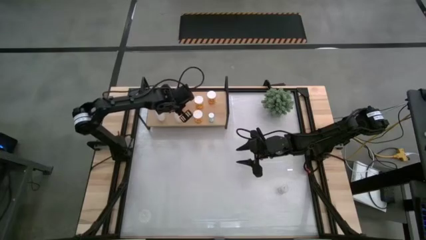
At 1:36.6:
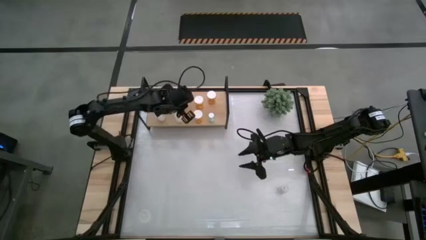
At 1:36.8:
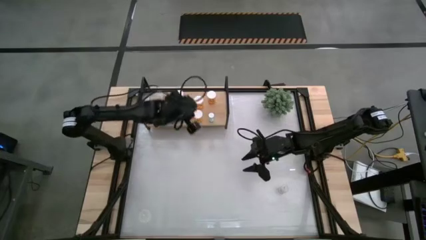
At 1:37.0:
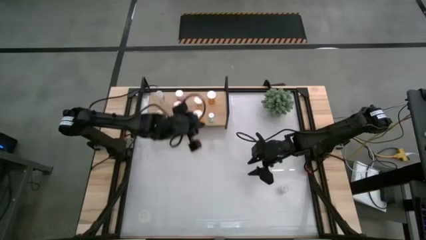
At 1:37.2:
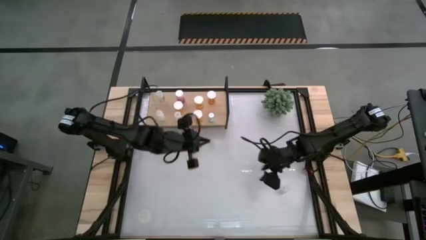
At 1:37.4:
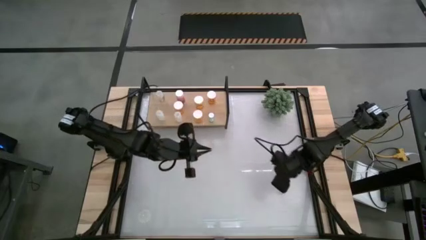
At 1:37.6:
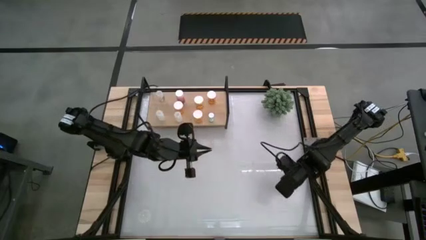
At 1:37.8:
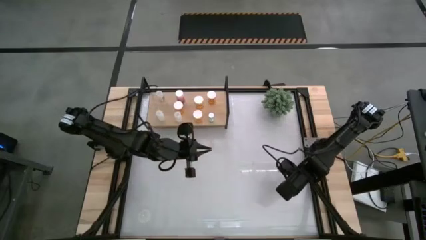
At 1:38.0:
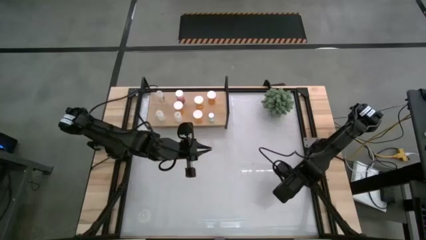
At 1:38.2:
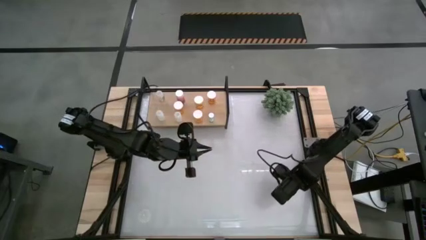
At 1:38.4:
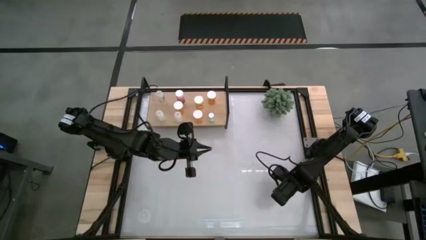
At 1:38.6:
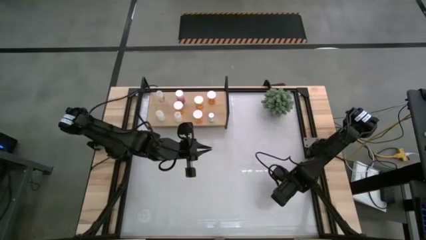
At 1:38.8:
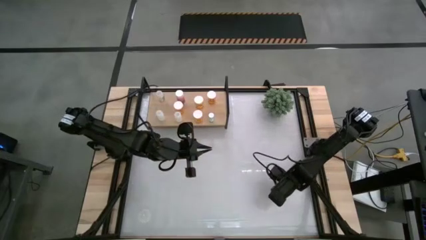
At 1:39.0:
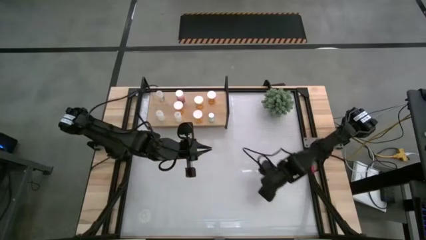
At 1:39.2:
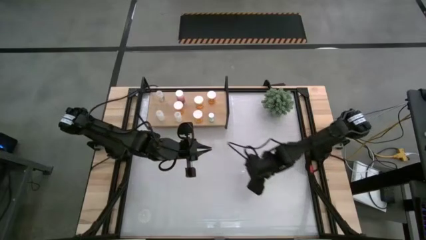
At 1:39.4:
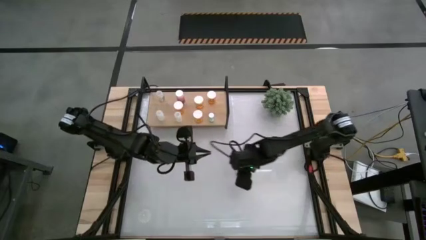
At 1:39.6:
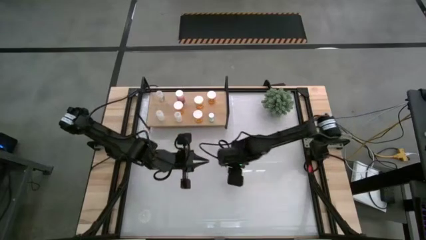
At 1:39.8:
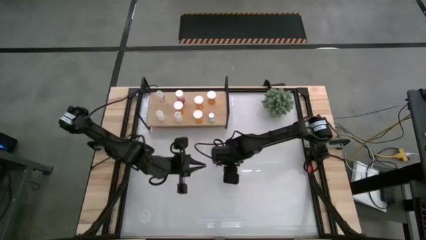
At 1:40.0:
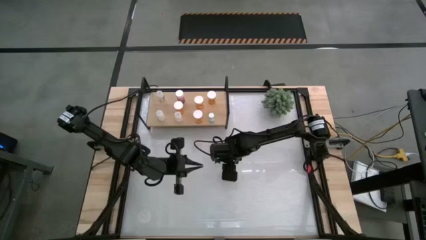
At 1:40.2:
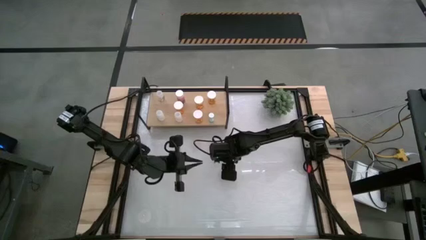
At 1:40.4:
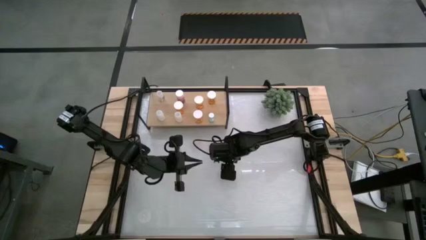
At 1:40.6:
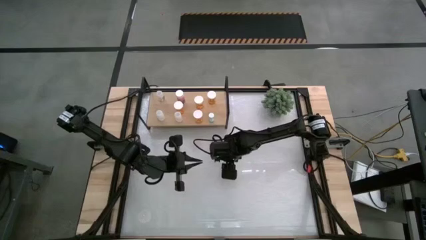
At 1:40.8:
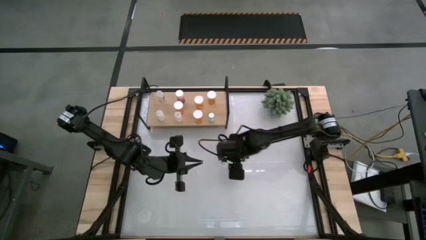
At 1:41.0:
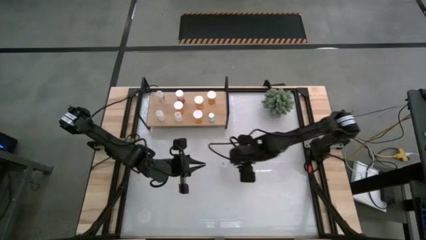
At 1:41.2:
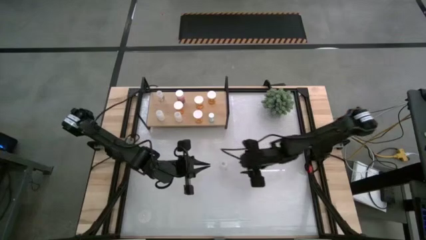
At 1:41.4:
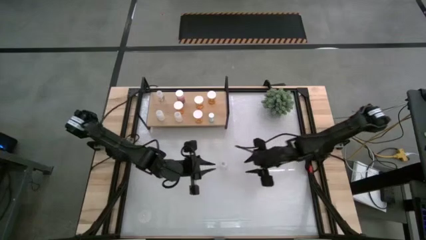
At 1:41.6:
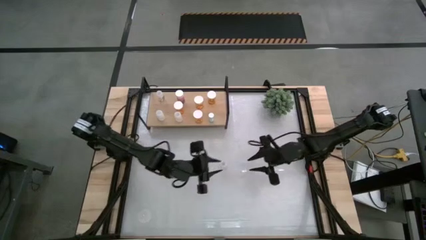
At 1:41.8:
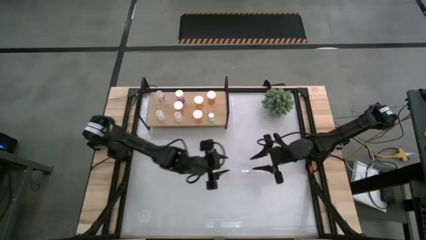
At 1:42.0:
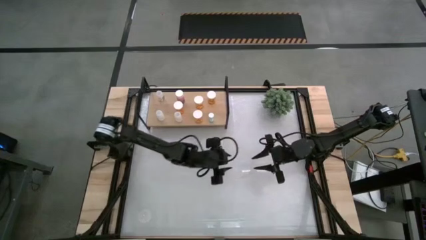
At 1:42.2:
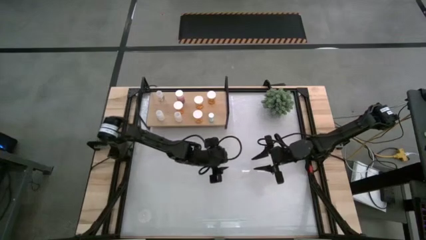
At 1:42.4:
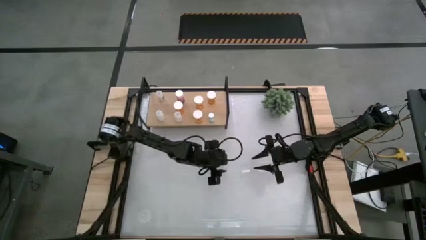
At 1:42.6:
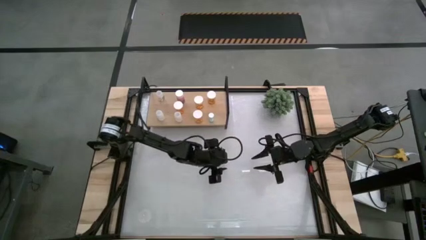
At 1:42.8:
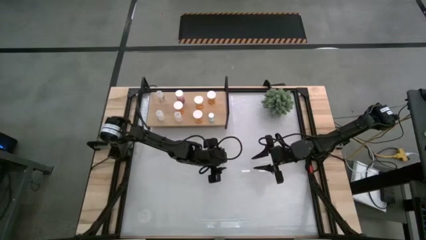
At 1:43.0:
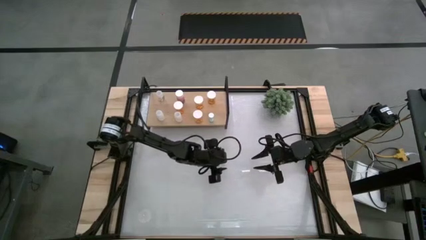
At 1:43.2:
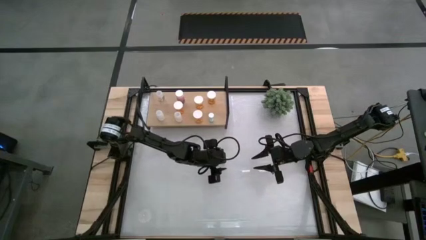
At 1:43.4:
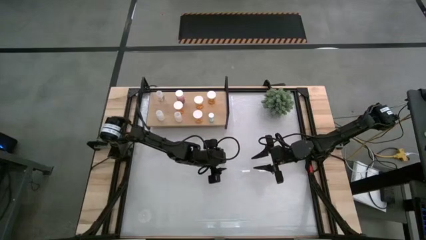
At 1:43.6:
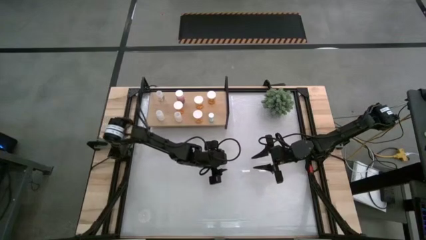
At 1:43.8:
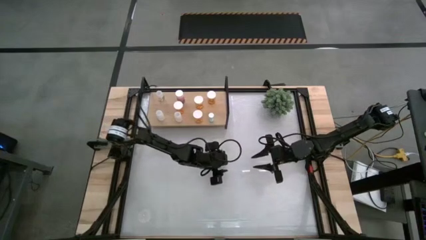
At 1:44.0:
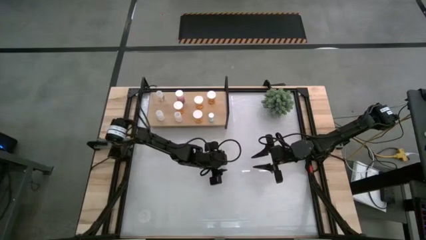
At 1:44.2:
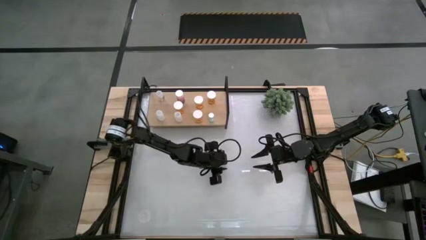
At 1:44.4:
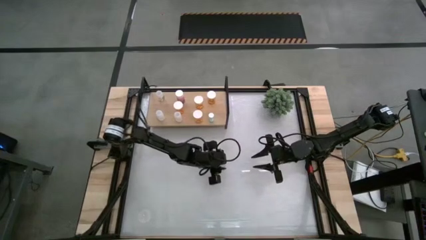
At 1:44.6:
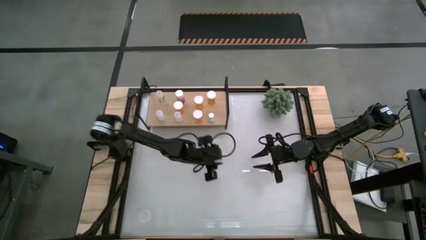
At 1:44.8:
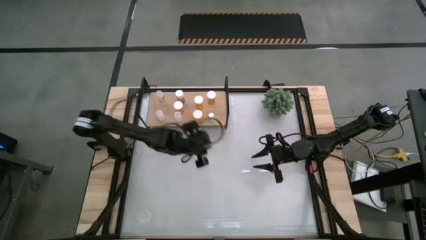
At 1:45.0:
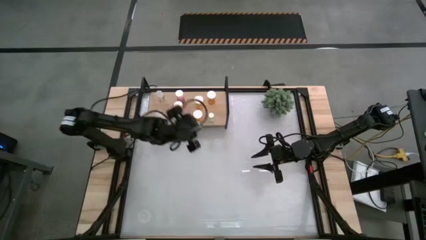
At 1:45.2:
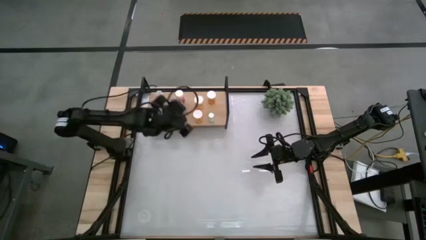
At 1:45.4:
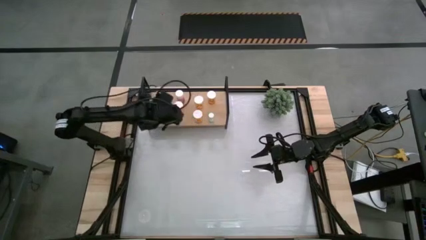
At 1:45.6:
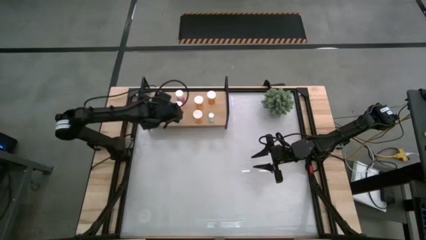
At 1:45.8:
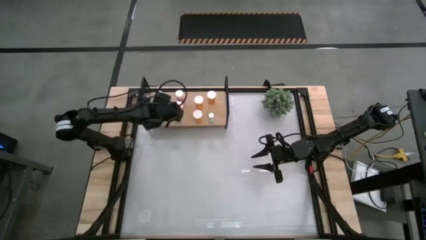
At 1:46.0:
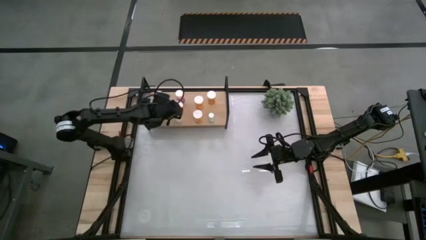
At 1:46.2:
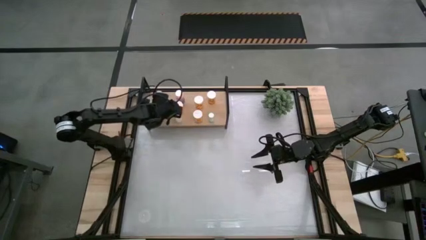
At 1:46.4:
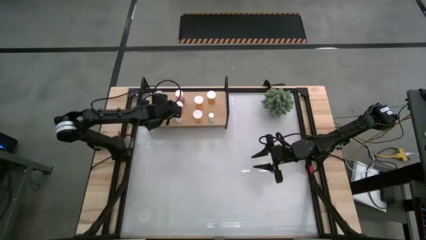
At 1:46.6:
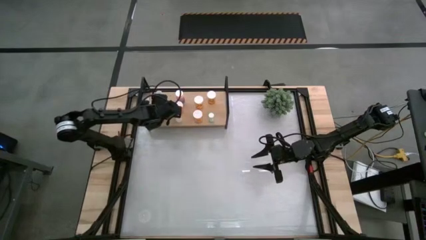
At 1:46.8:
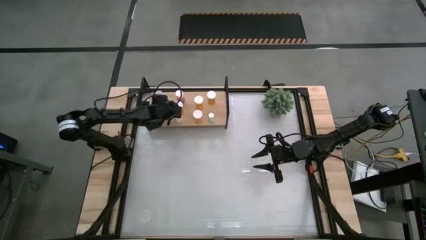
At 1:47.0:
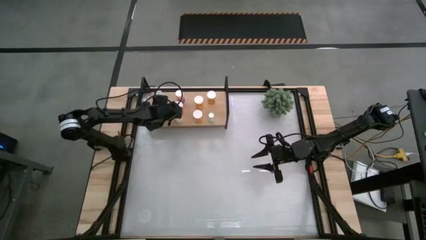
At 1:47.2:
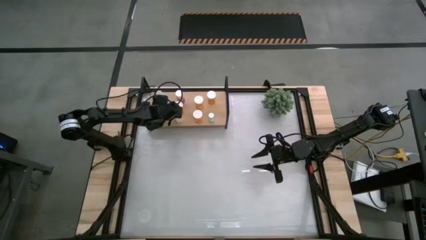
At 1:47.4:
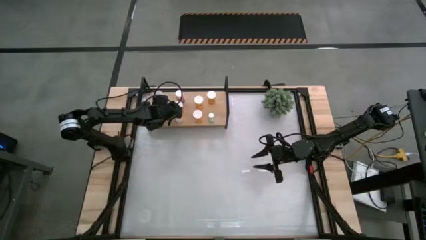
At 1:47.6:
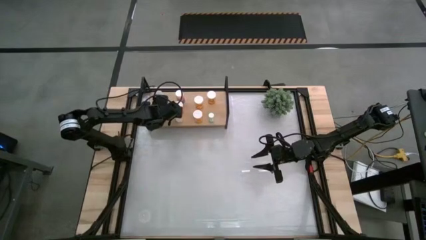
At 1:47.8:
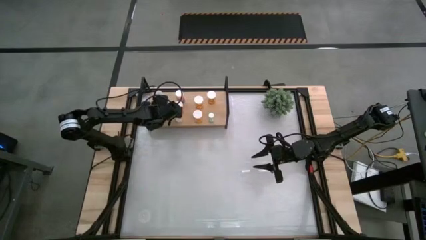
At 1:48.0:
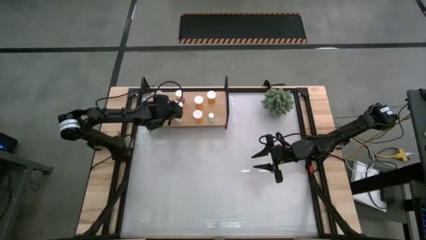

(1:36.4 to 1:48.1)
Task: Pick and place medicine bottles onto shelf by color
Put the transparent pill bottle on the shelf

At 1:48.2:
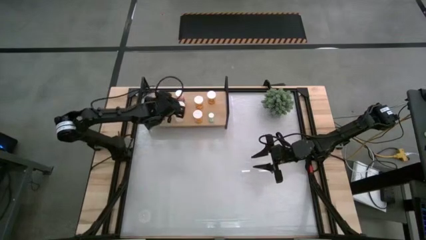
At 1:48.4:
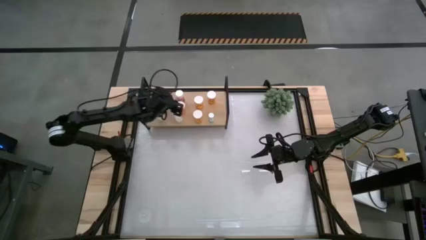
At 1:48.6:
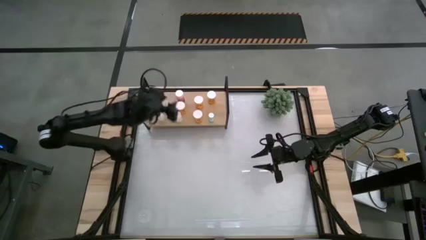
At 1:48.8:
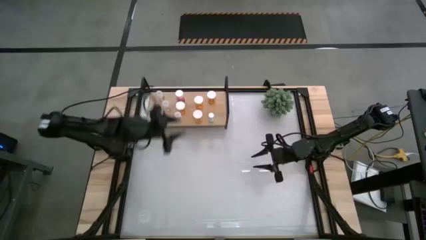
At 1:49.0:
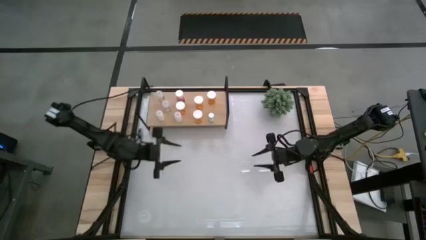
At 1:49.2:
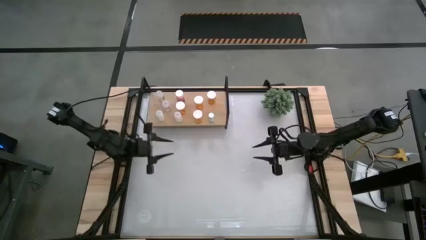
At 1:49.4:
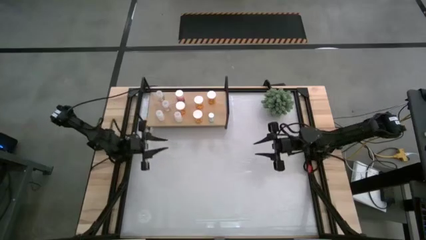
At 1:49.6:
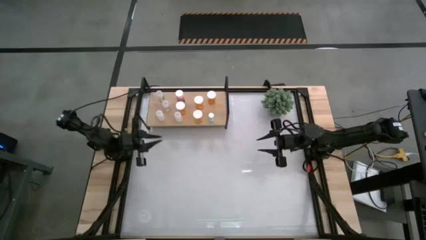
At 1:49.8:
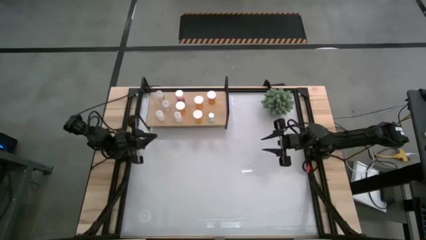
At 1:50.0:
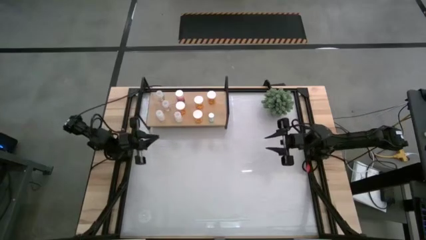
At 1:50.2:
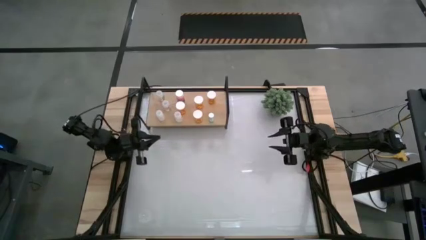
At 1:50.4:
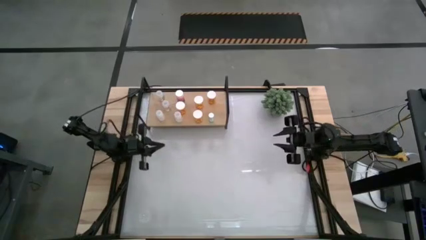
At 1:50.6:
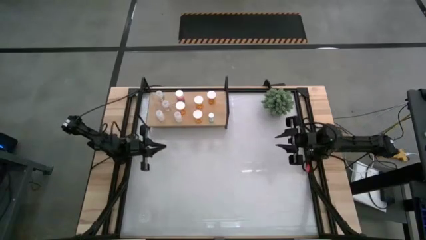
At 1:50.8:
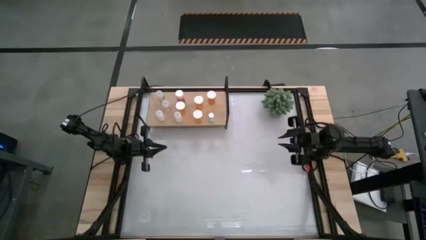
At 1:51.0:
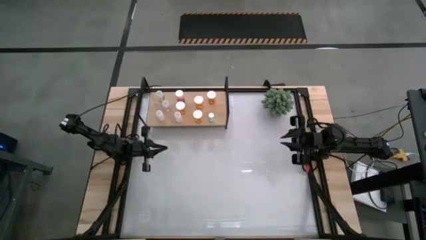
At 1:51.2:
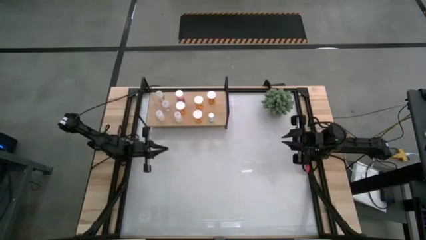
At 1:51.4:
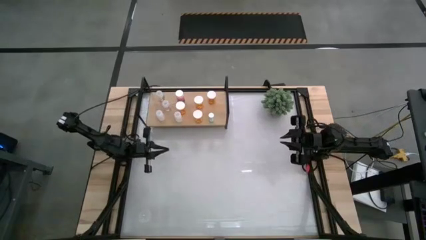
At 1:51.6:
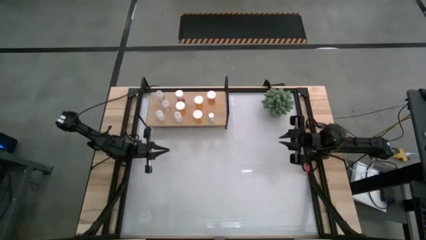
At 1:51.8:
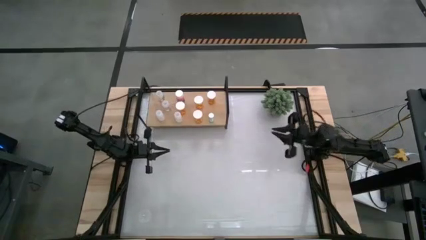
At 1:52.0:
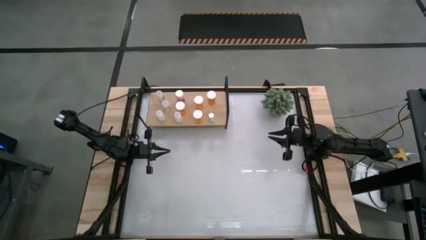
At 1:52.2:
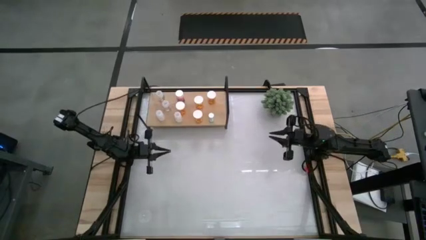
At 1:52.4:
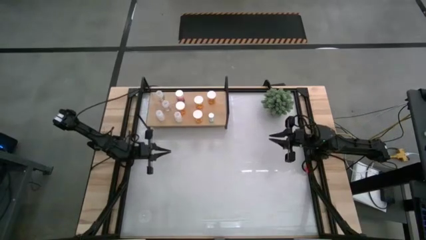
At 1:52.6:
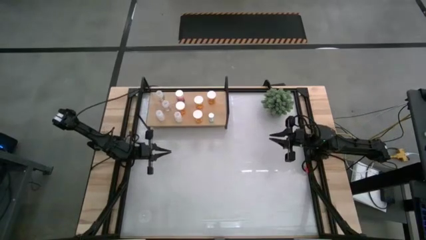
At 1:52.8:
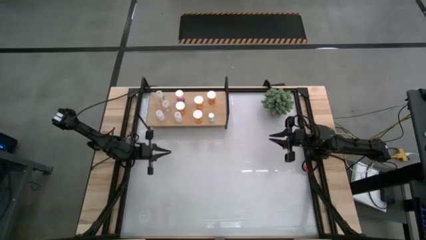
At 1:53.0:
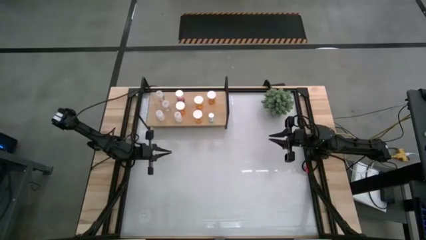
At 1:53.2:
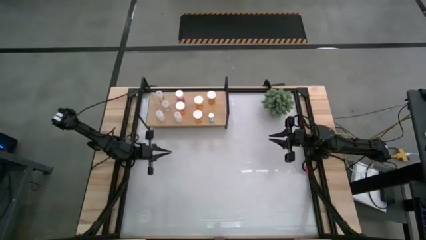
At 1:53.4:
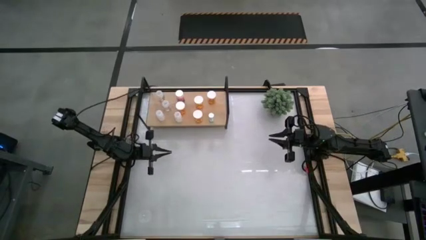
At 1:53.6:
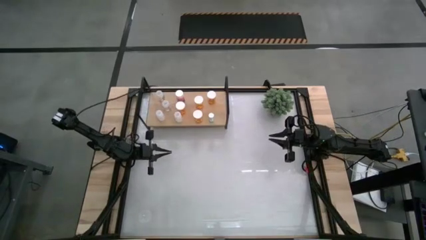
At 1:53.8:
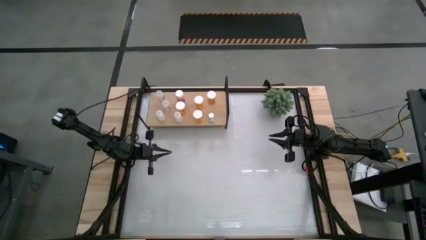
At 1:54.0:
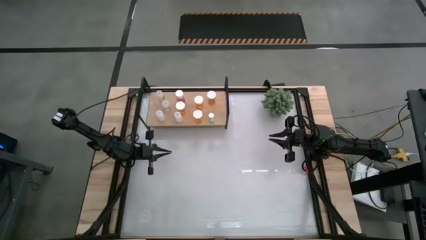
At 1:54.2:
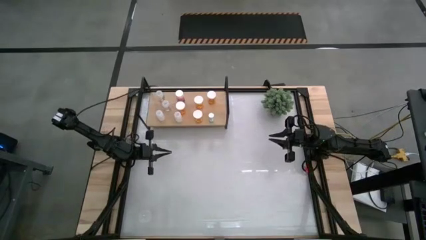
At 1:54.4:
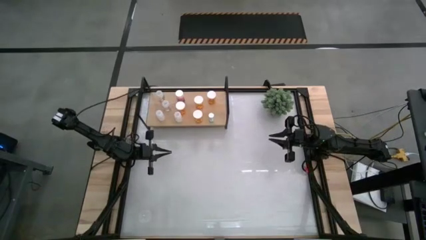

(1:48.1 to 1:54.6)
Return to Home Position
